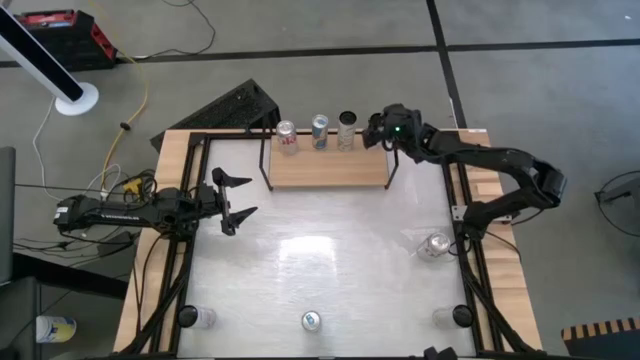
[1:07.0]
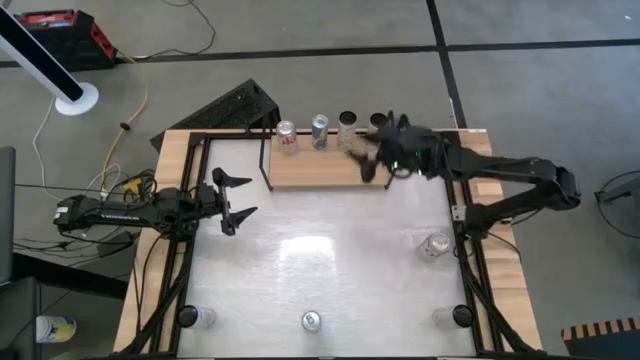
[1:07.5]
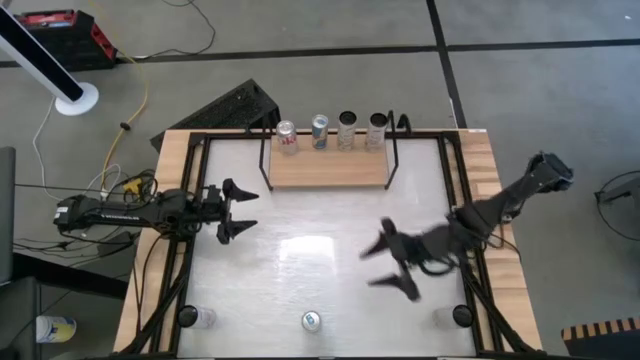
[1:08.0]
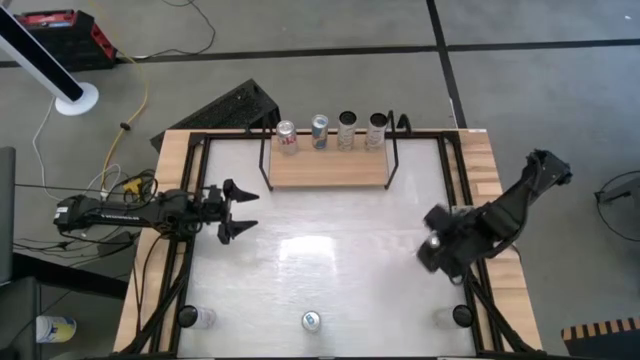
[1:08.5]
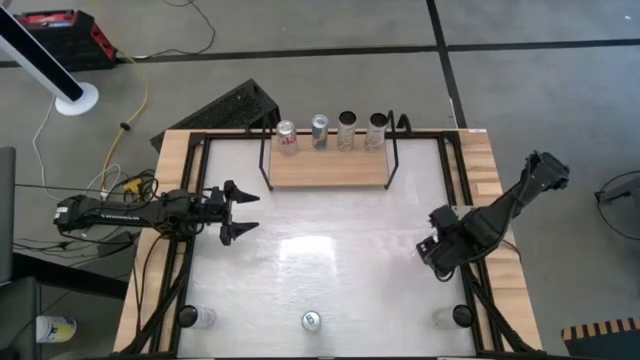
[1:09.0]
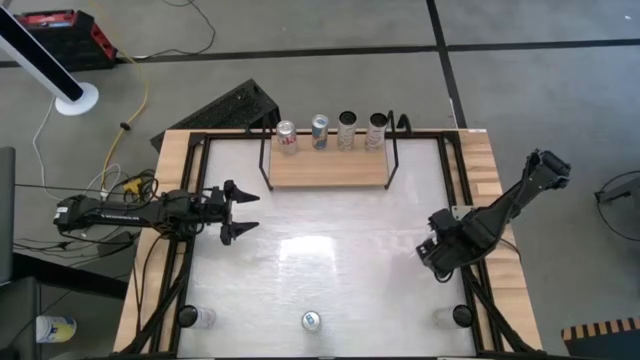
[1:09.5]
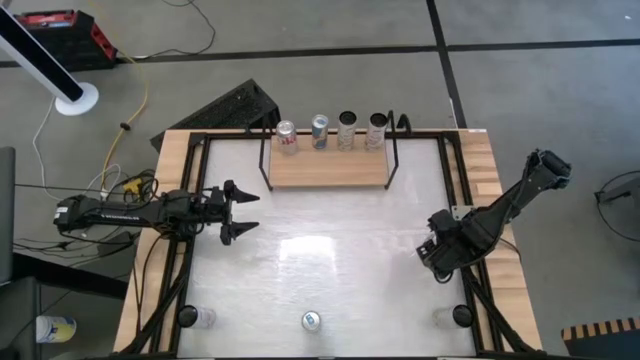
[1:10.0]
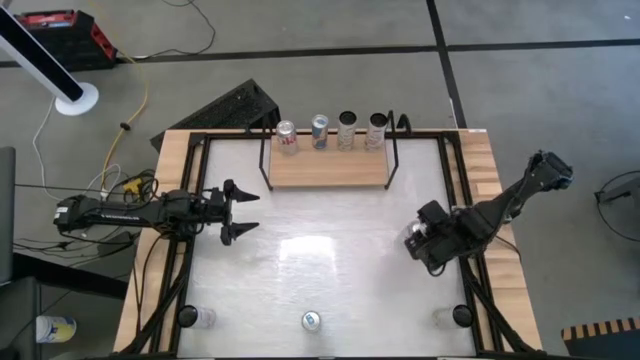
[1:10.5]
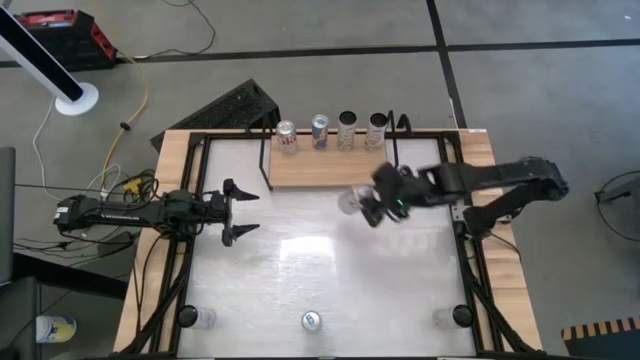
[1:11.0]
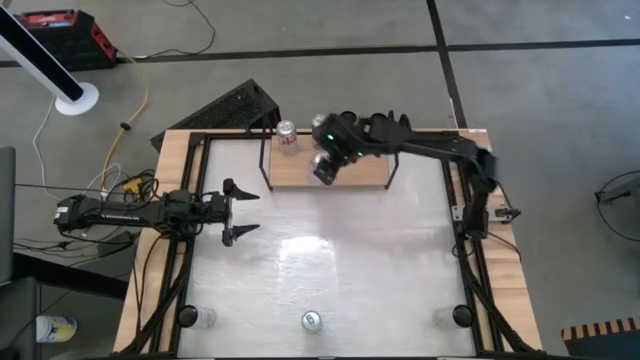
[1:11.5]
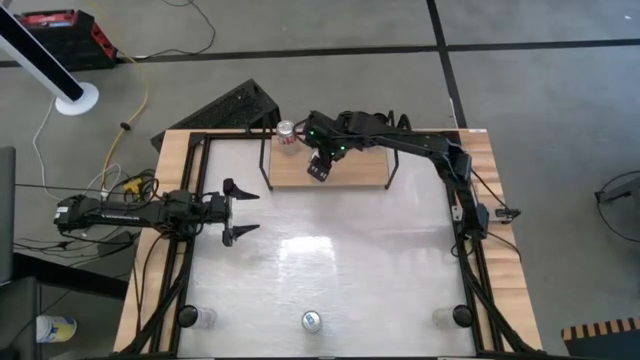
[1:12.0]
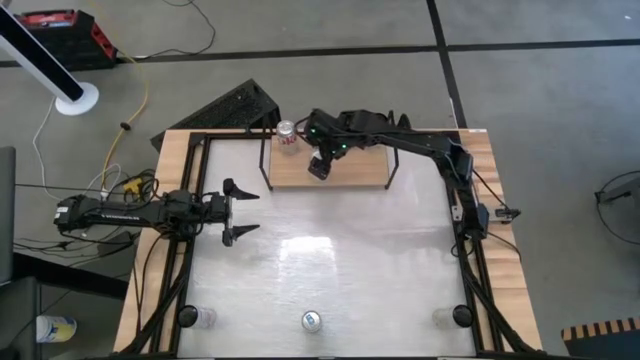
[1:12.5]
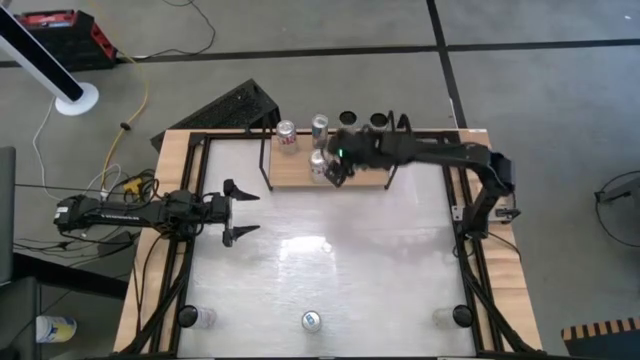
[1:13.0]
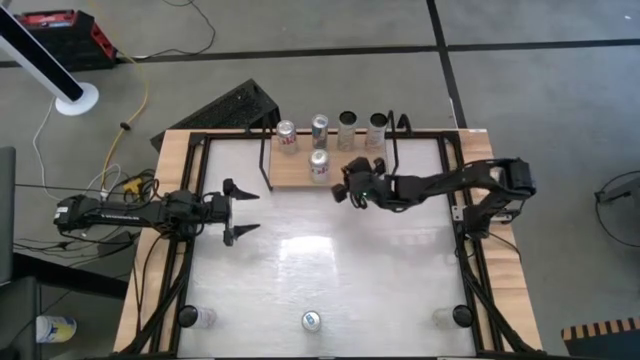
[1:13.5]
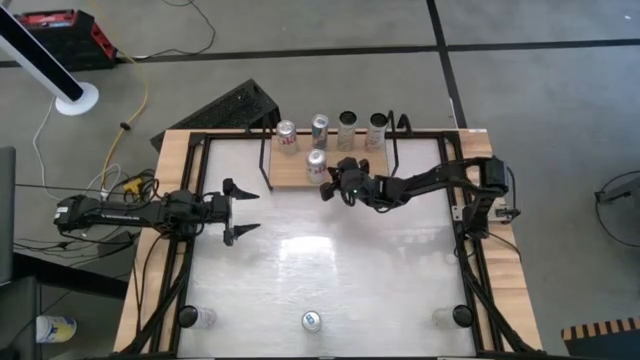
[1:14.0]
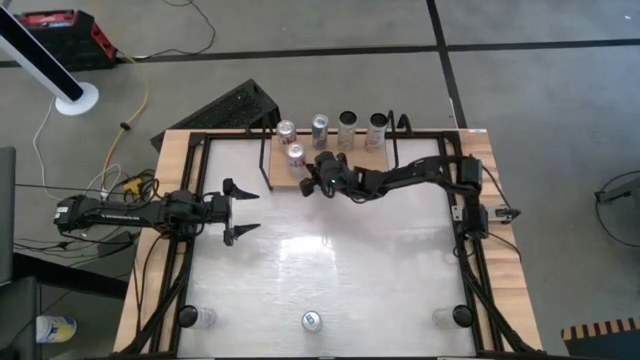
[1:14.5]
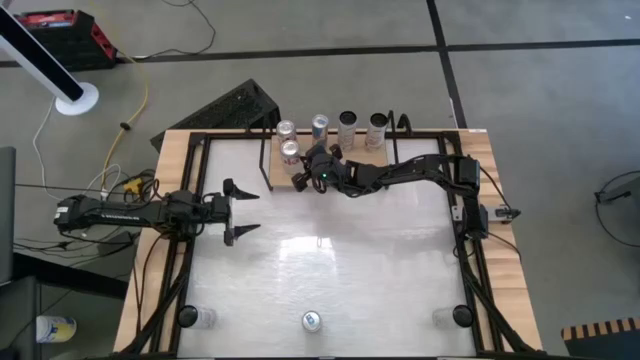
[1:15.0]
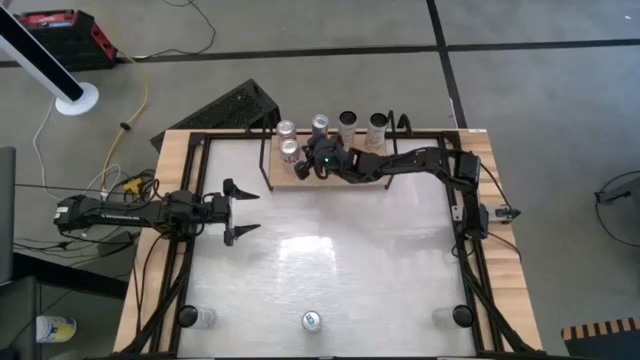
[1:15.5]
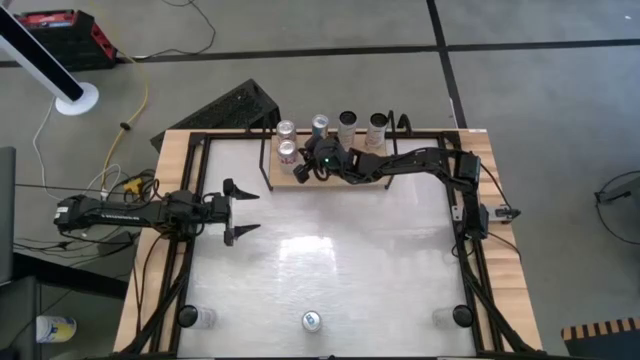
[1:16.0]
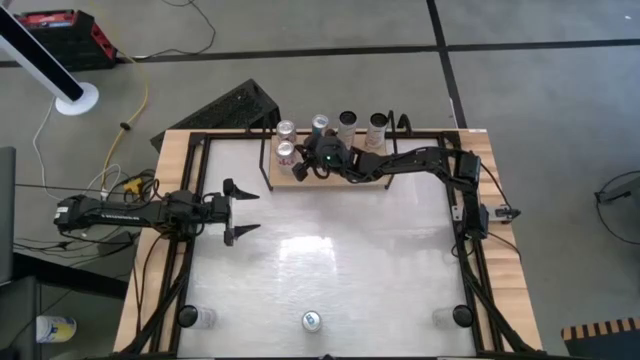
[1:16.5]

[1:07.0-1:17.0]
Task: Place canned beverage on shelf
Put the red-silver soda can on the shelf aligned with the other red-silver soda can on the shelf

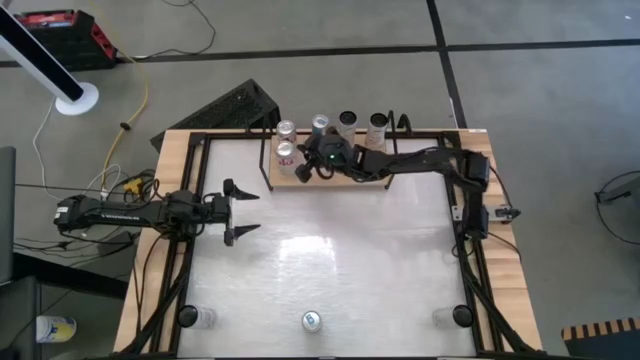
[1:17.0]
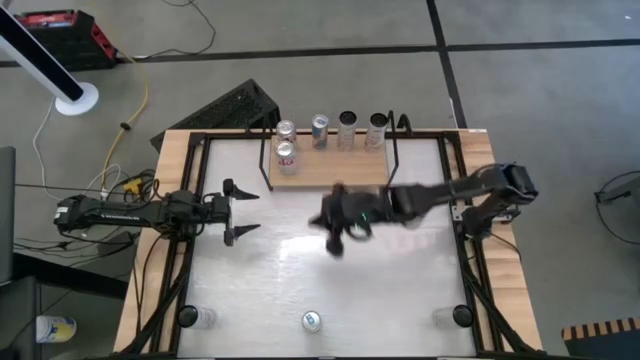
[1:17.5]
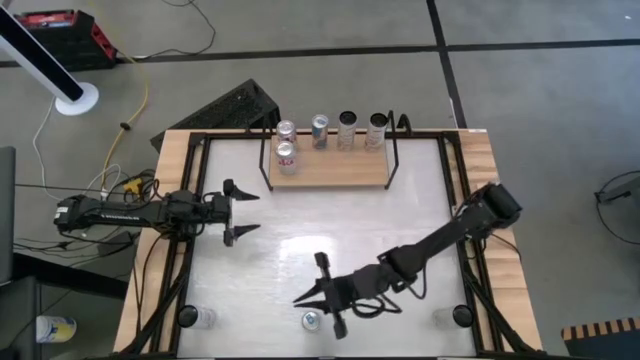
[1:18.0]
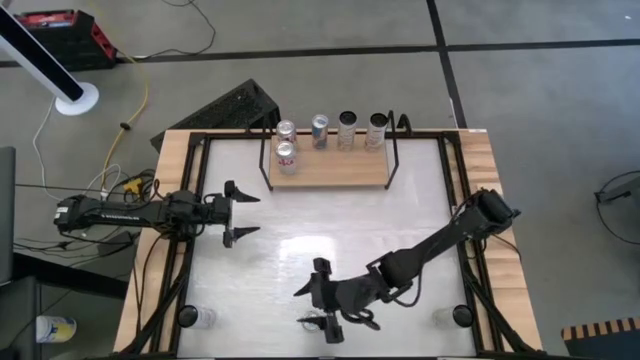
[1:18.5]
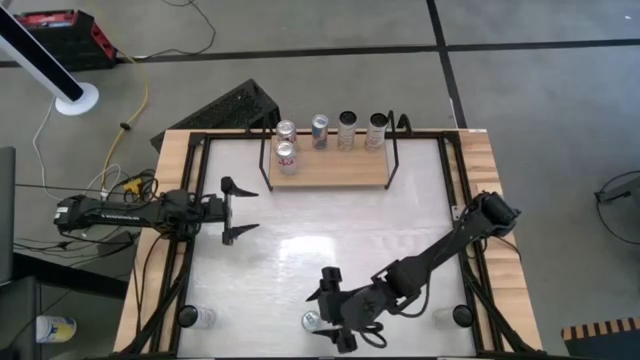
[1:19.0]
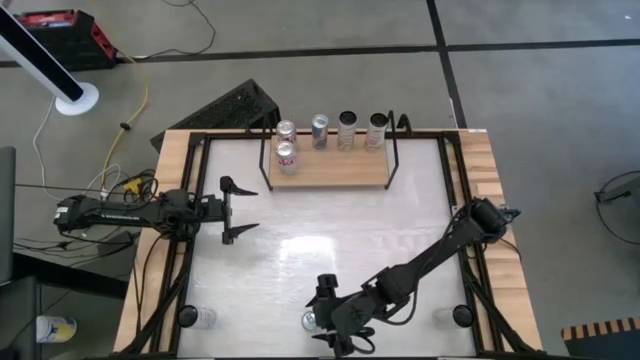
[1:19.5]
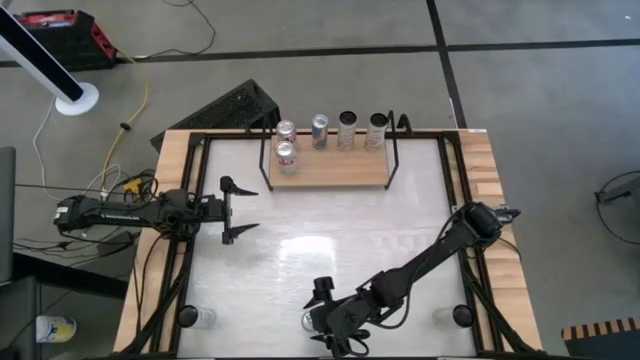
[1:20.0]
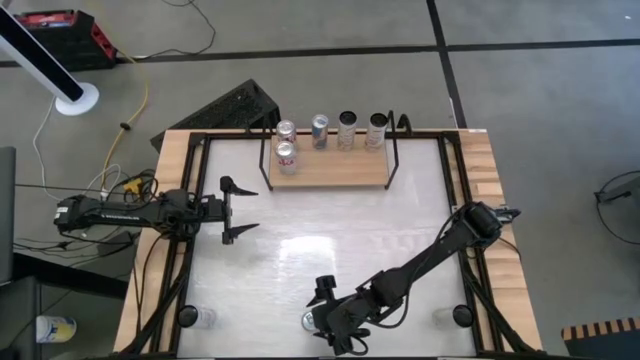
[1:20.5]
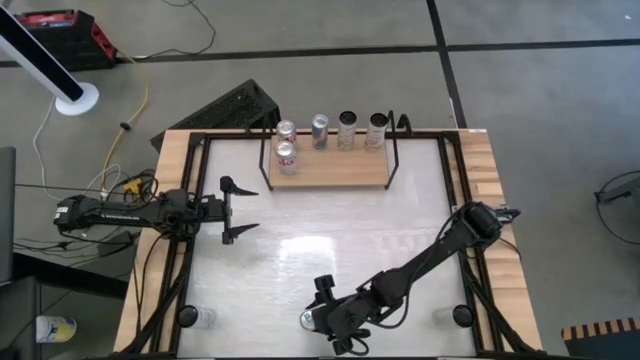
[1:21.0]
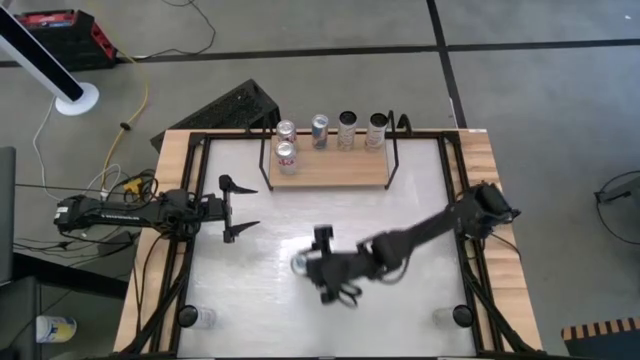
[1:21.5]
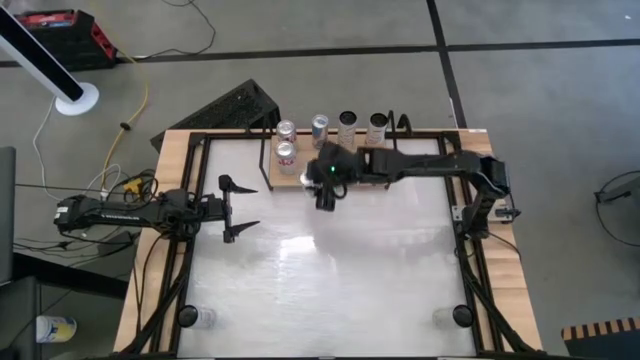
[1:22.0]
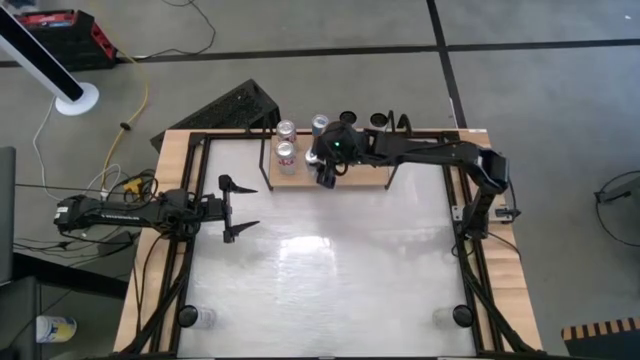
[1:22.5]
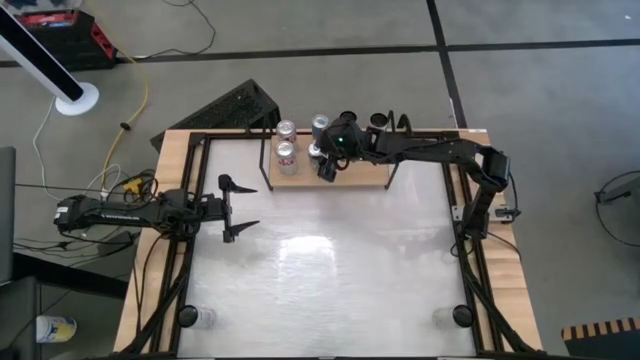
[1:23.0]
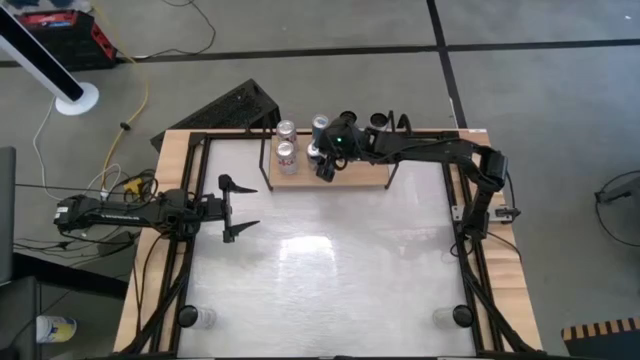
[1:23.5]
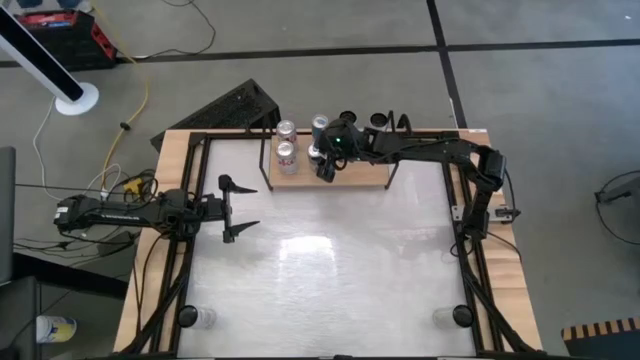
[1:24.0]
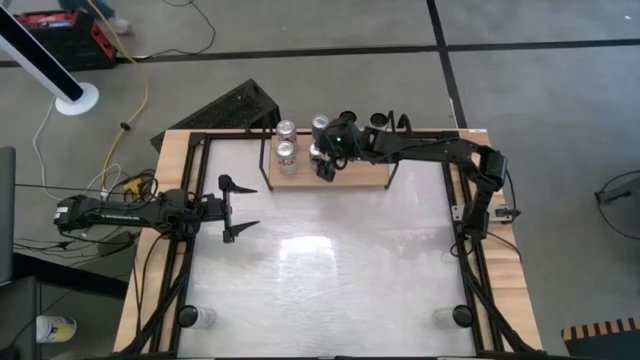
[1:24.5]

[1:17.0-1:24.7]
Put the blue soda can on the shelf aligned with the other blue soda can on the shelf

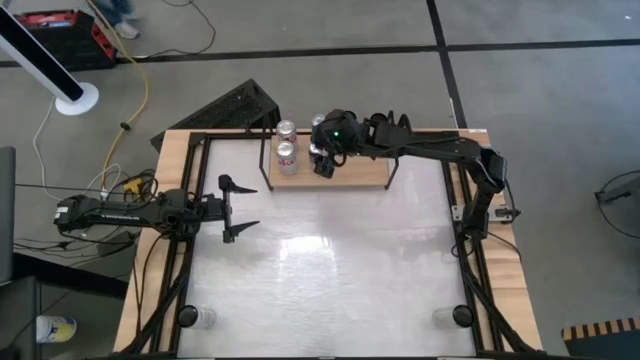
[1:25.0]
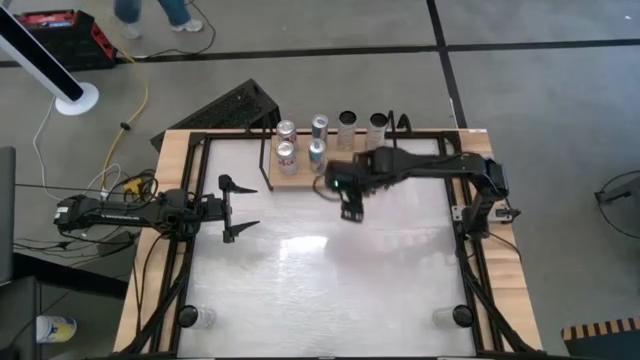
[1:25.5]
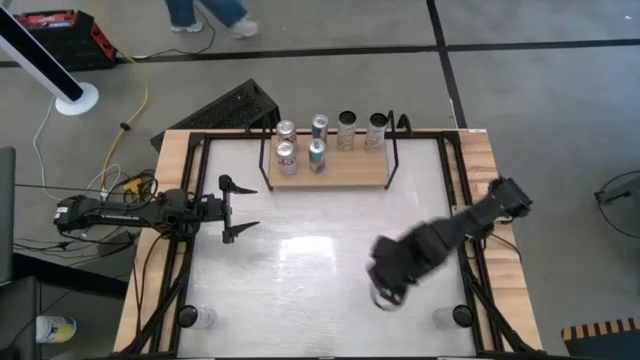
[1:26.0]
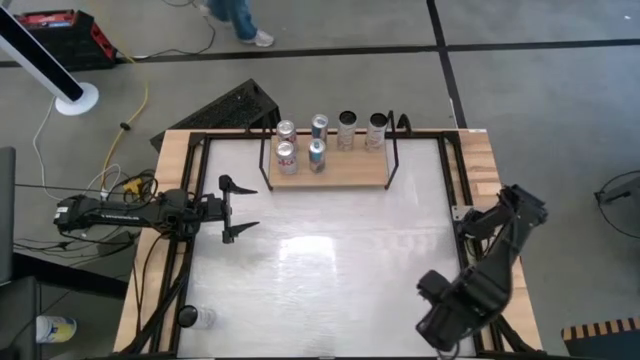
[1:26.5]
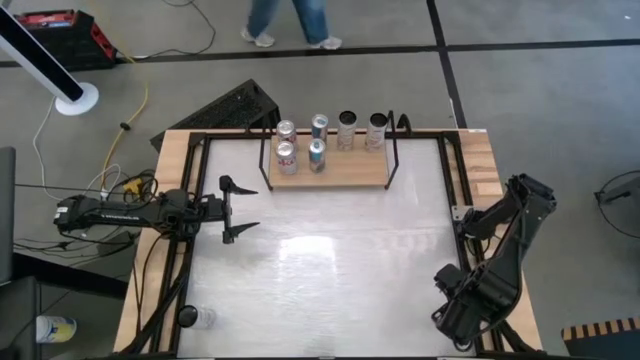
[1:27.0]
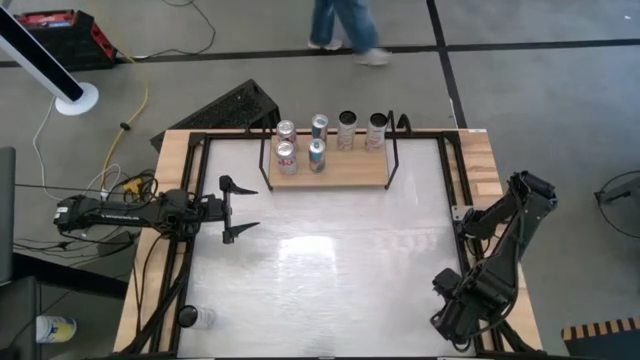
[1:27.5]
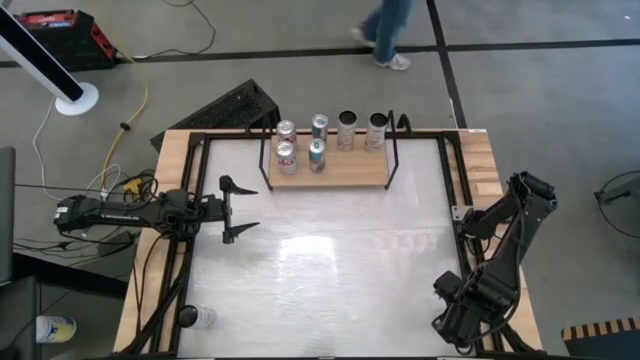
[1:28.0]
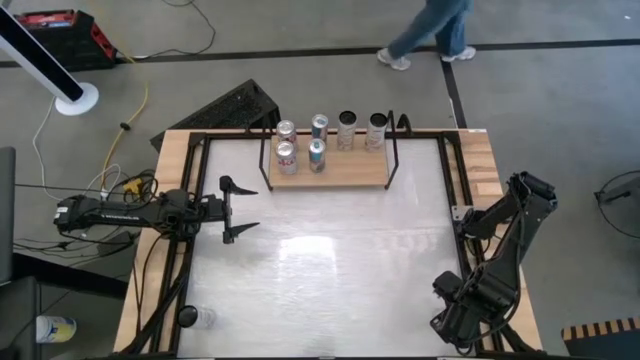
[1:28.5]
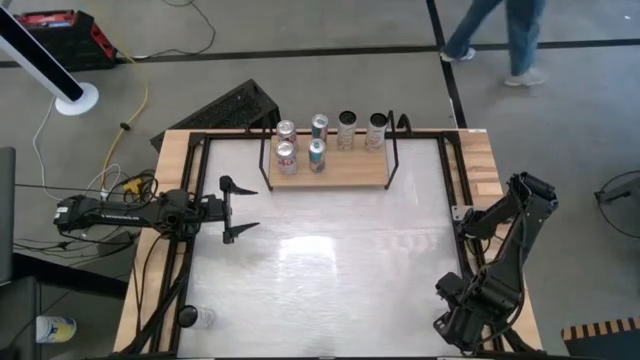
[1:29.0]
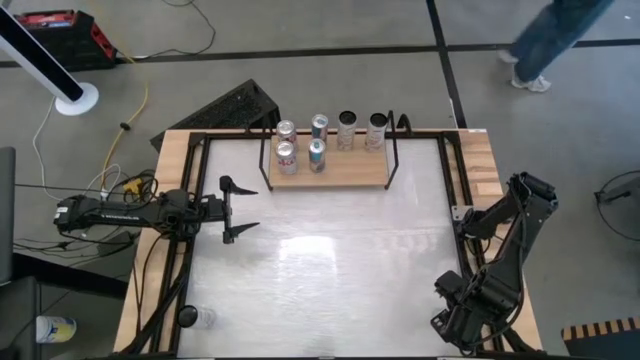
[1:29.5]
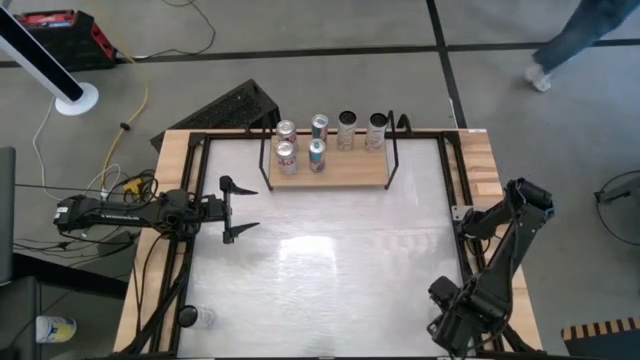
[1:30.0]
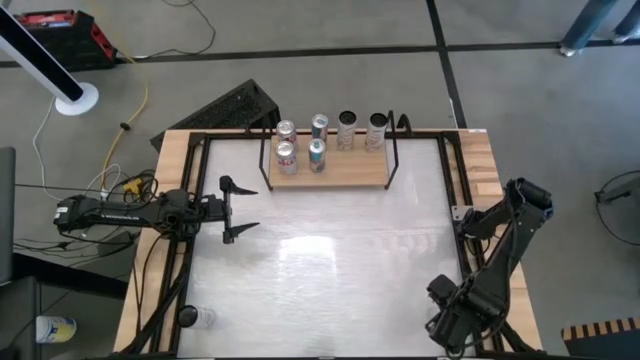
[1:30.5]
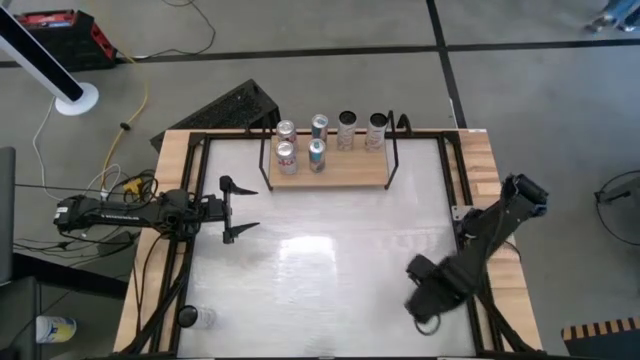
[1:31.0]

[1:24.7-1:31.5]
Put the white-yellow soda can on the shelf aligned with the other white-yellow soda can on the shelf
